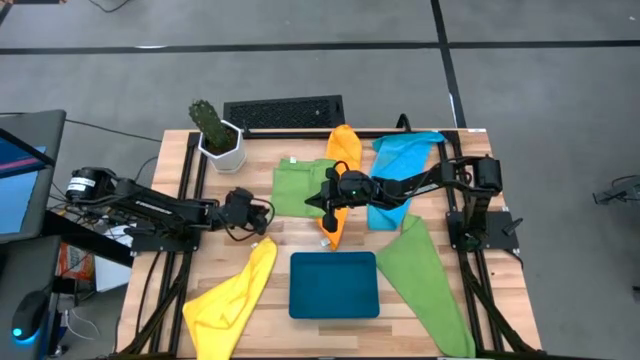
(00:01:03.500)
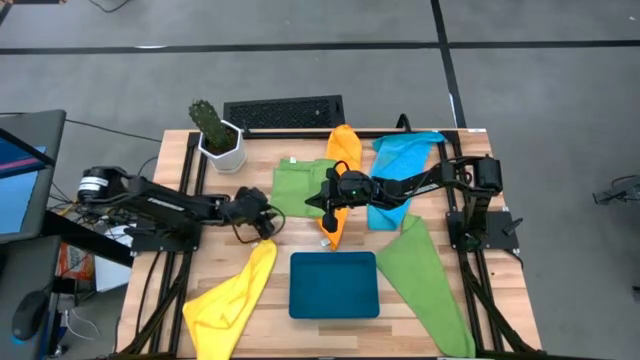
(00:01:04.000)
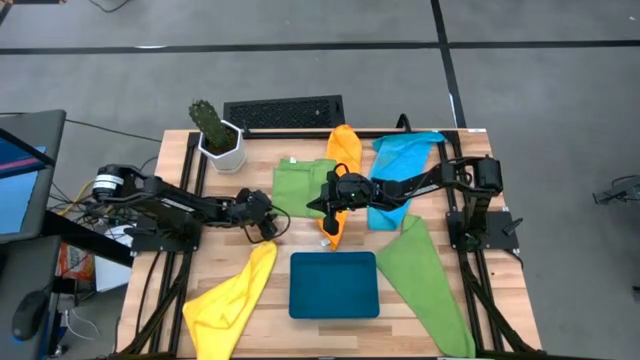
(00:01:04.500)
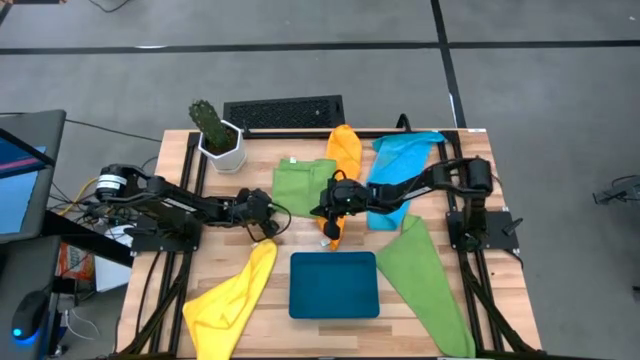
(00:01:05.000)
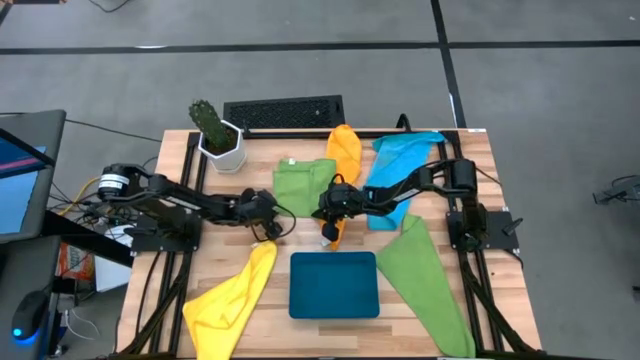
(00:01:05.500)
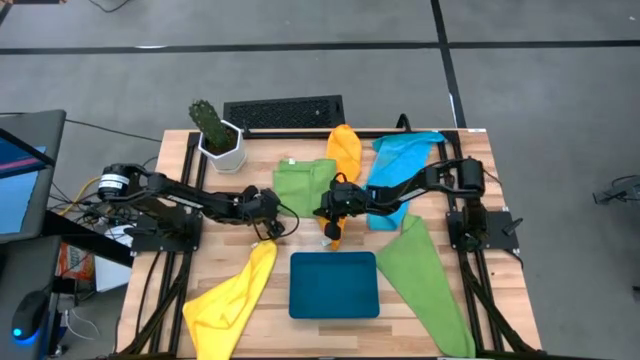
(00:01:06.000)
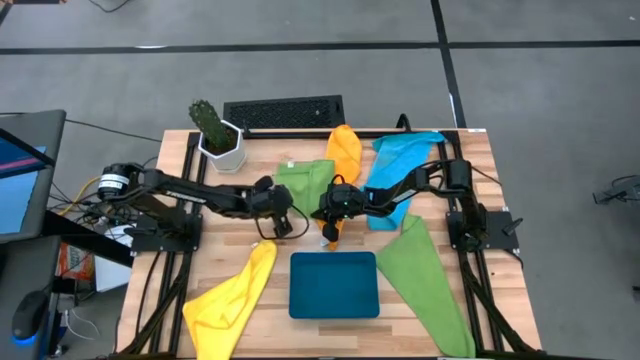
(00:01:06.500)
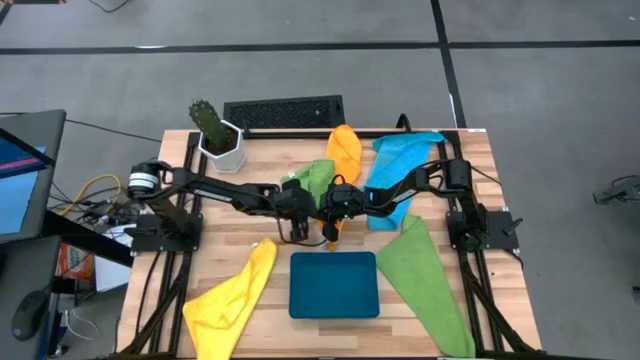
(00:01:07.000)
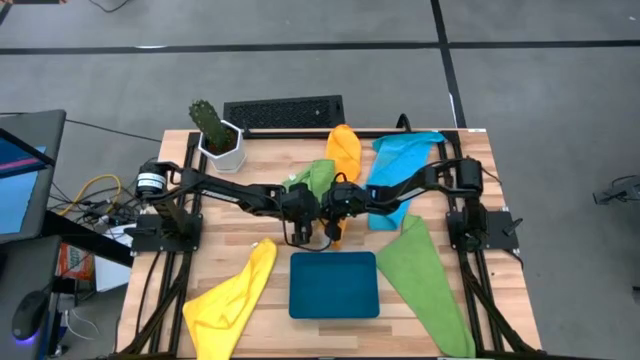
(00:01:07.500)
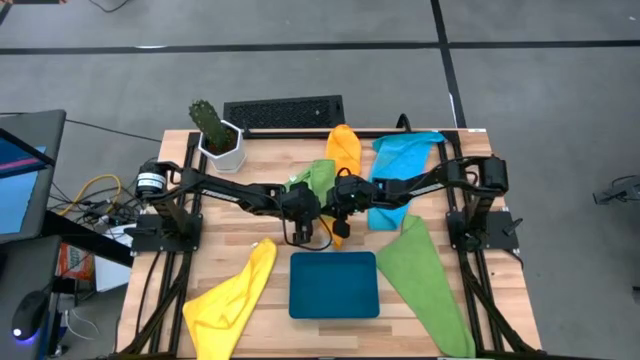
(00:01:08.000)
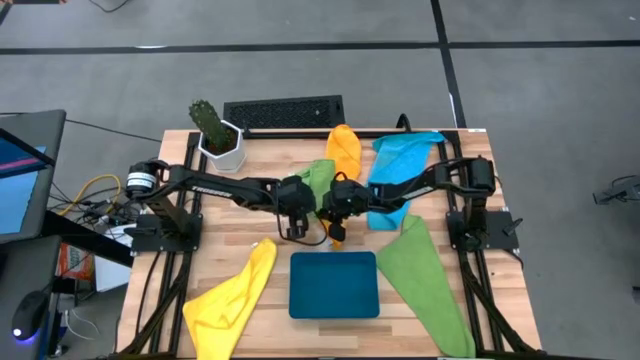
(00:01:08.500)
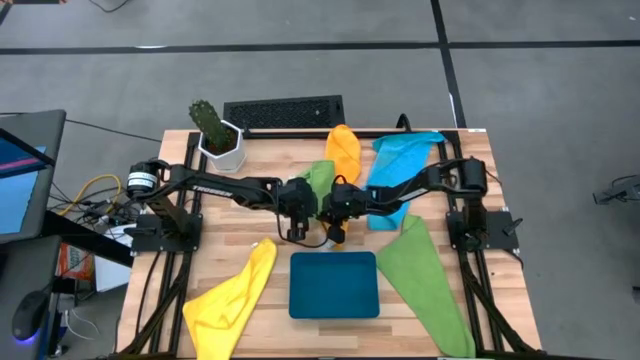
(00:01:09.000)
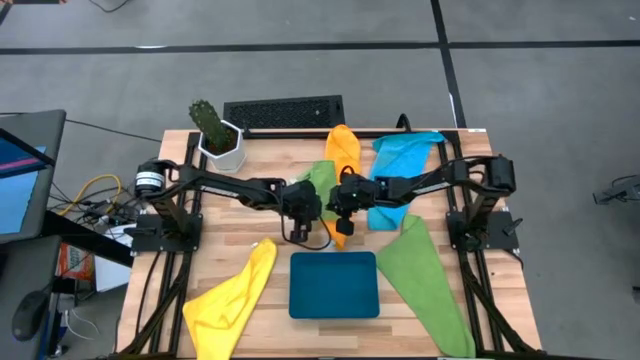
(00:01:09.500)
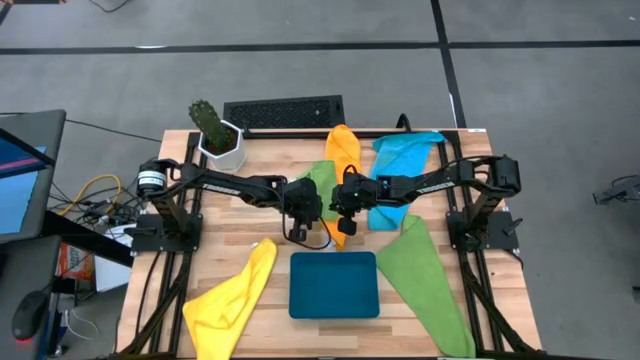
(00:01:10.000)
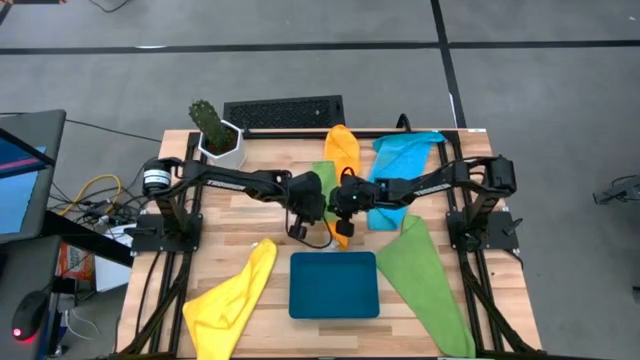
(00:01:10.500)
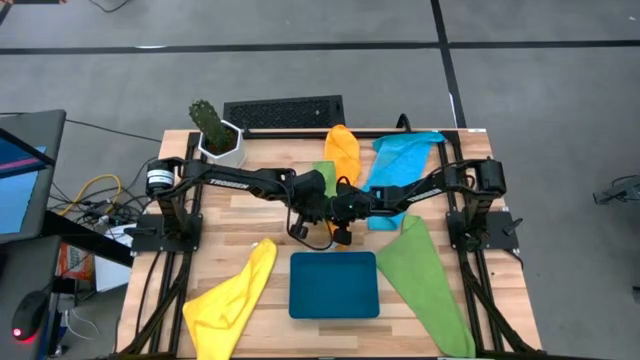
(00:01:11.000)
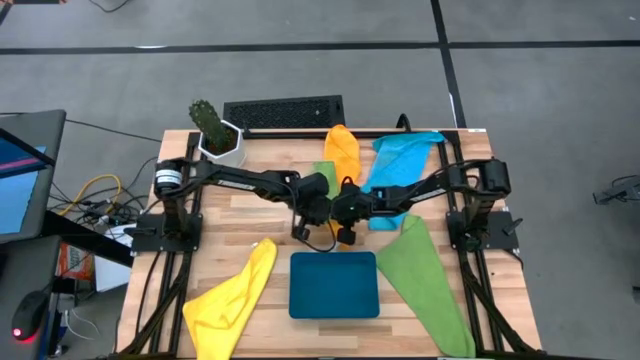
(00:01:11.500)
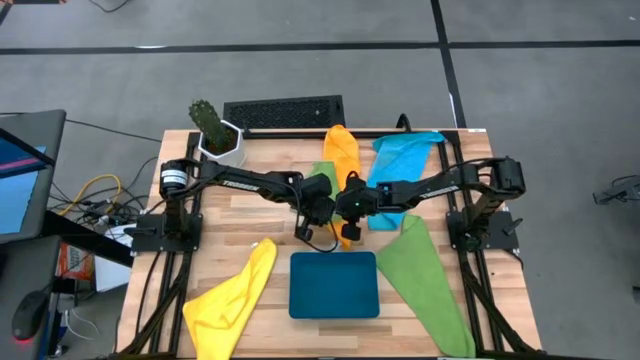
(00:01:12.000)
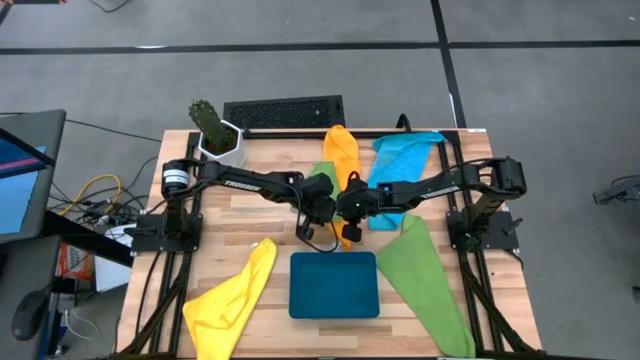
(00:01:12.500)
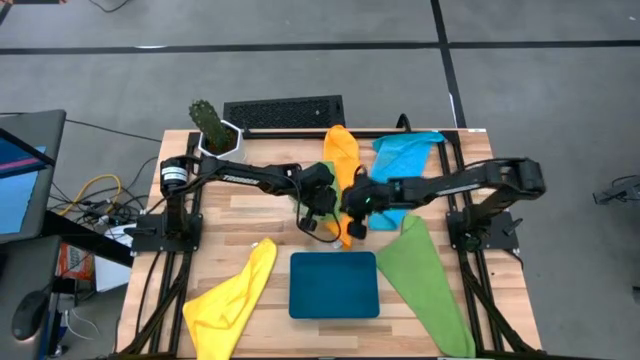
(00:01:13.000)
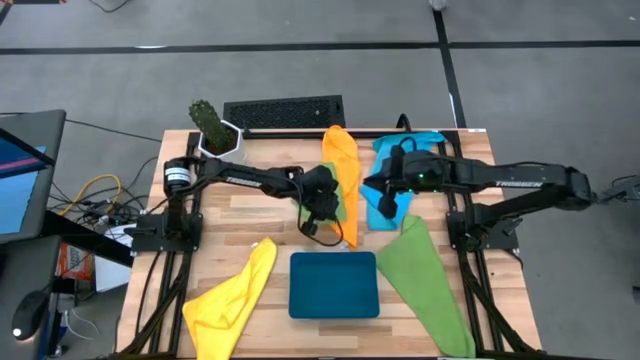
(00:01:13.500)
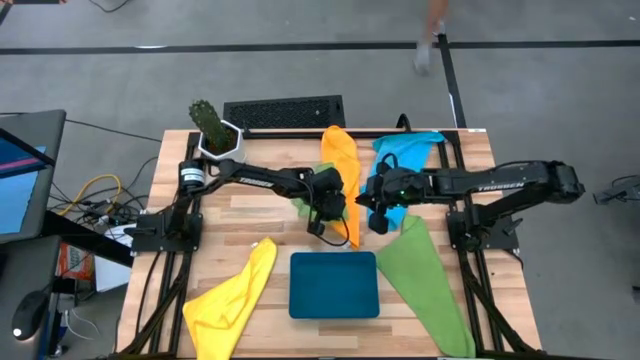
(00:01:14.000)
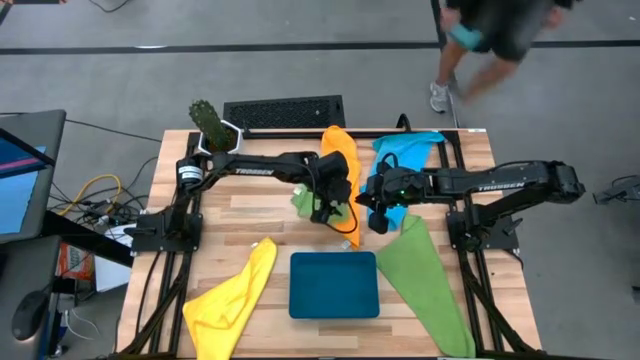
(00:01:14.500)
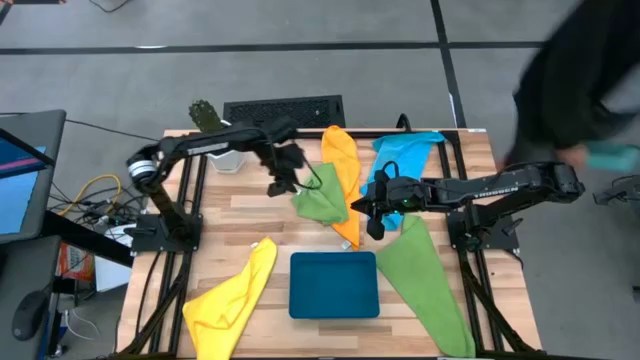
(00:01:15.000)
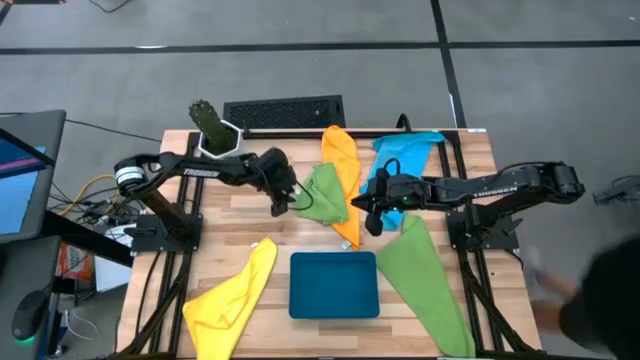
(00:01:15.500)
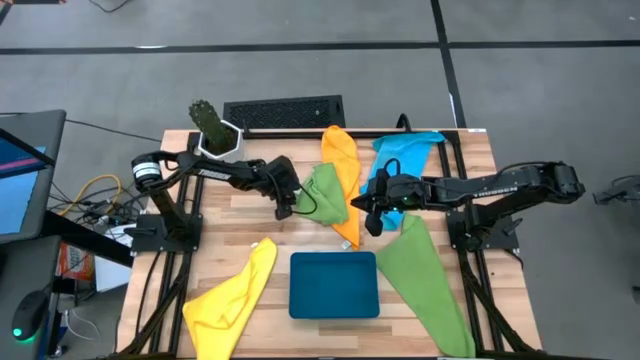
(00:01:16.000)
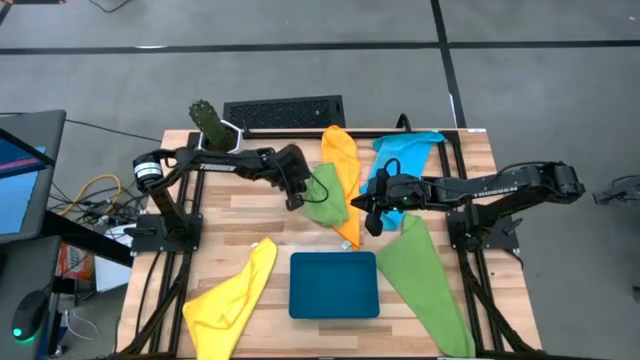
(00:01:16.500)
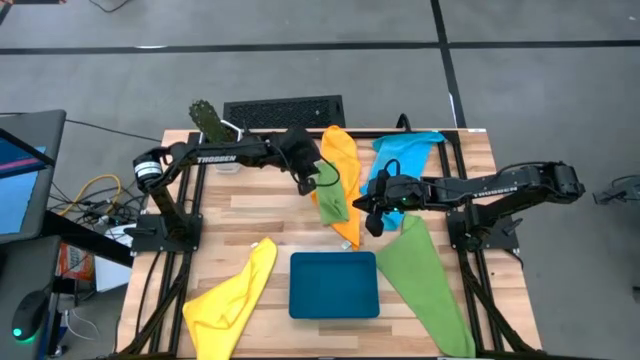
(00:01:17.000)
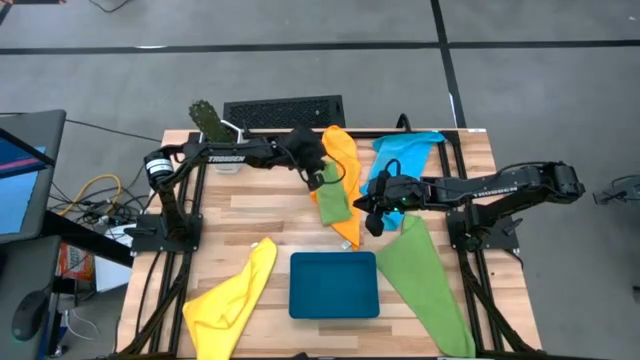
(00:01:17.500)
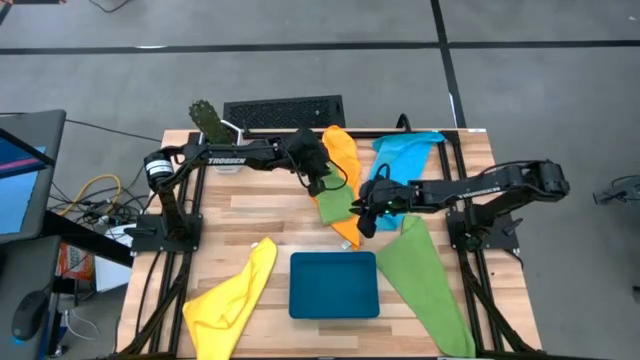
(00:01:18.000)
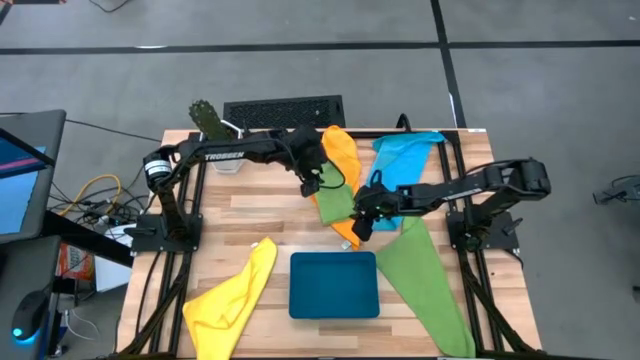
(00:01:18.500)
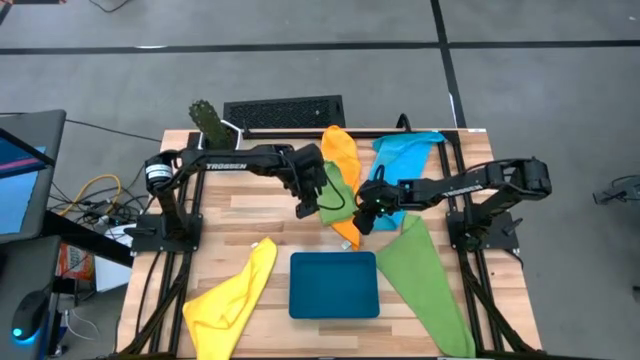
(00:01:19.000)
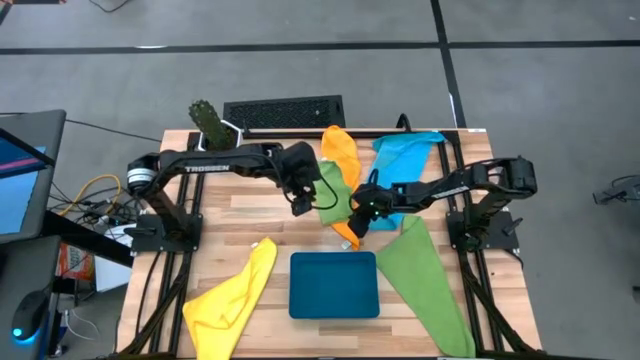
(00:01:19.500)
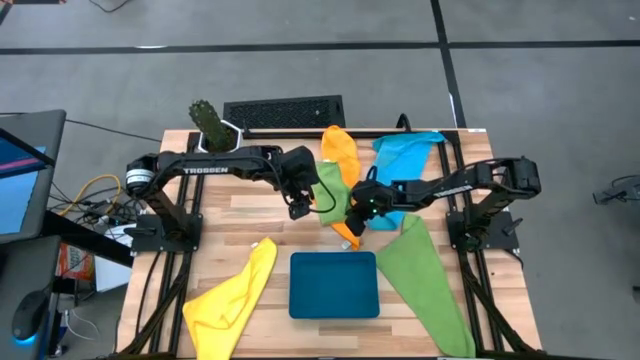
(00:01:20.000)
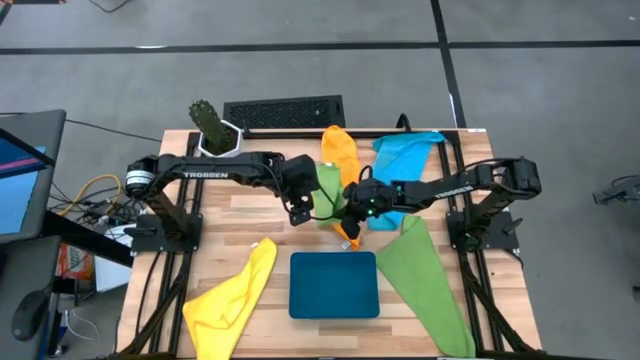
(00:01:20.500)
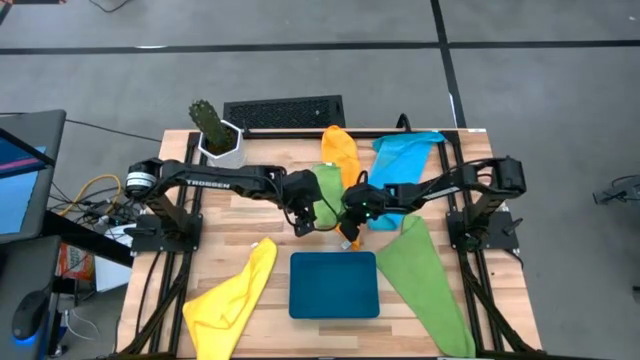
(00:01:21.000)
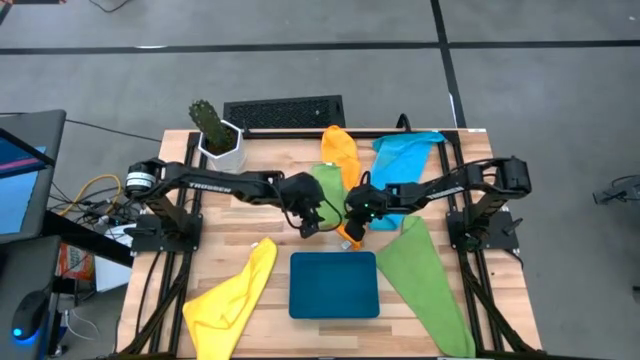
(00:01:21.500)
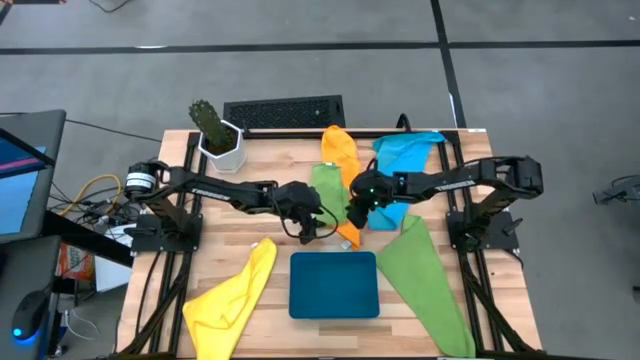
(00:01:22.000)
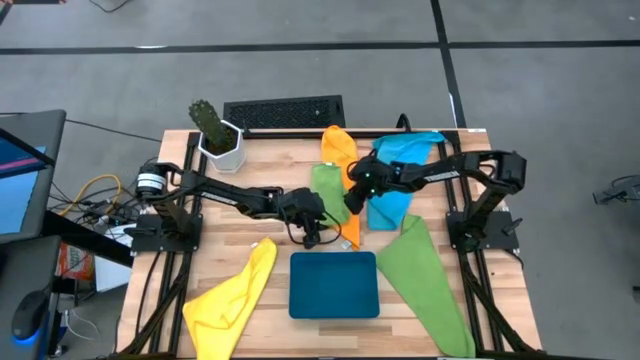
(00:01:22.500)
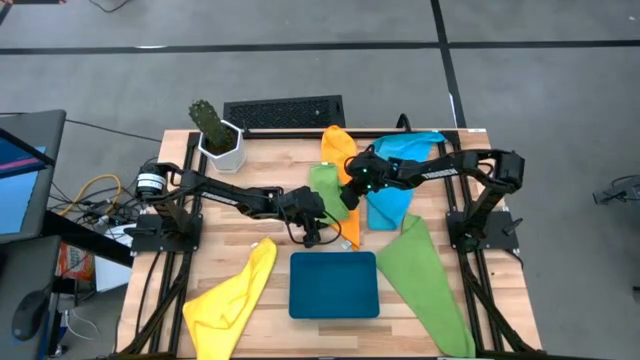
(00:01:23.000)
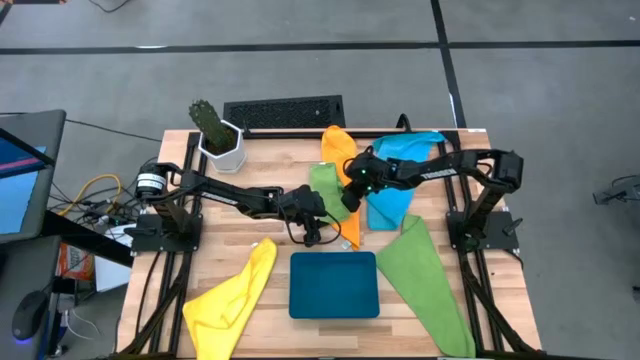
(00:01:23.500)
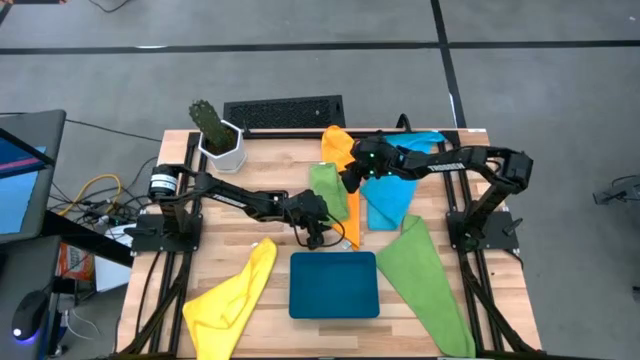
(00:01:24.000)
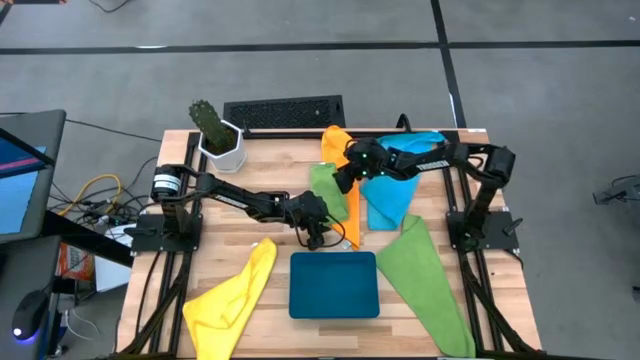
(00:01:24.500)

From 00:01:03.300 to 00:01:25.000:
Task: Fold microfiber towels
Fold the top green microfiber towel

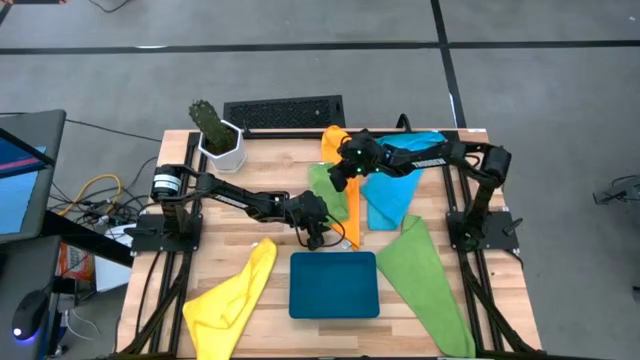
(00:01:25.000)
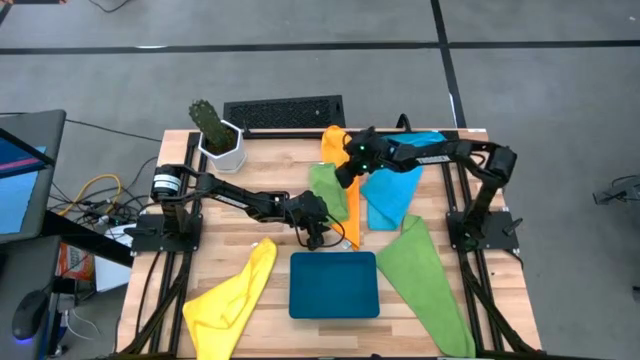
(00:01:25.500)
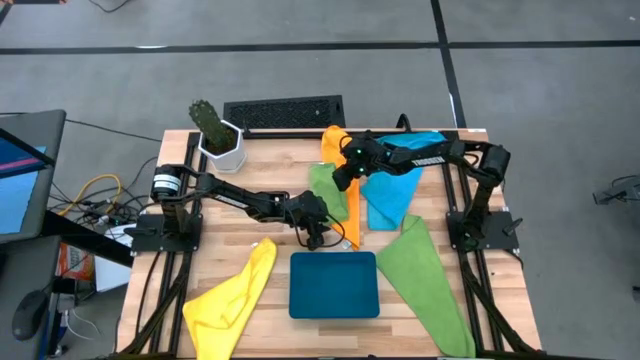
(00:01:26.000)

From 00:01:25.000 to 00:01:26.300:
Fold the top green microfiber towel
